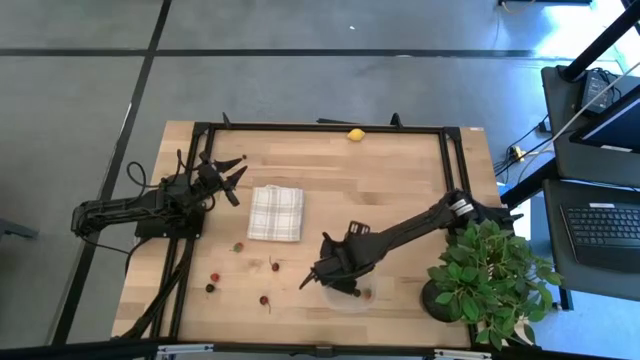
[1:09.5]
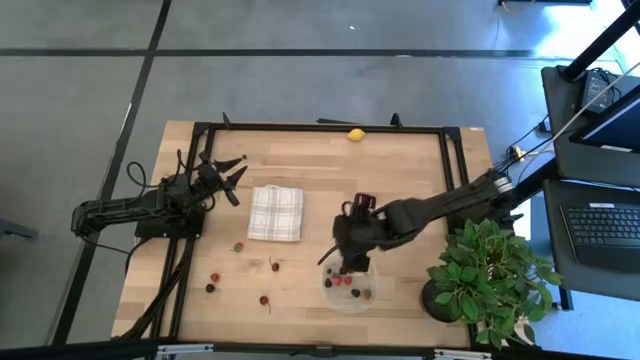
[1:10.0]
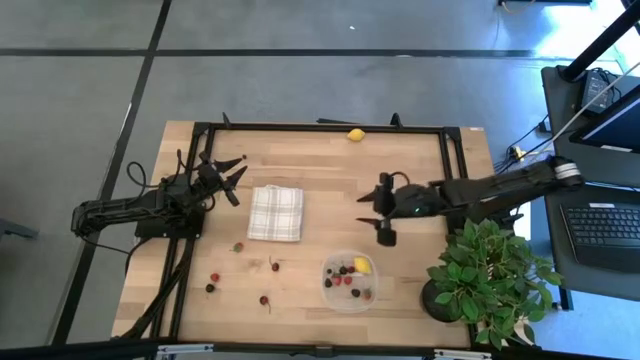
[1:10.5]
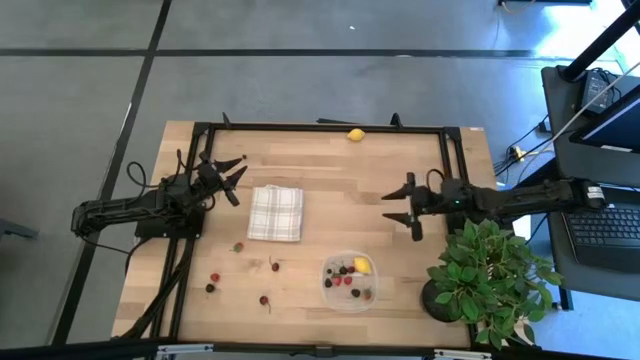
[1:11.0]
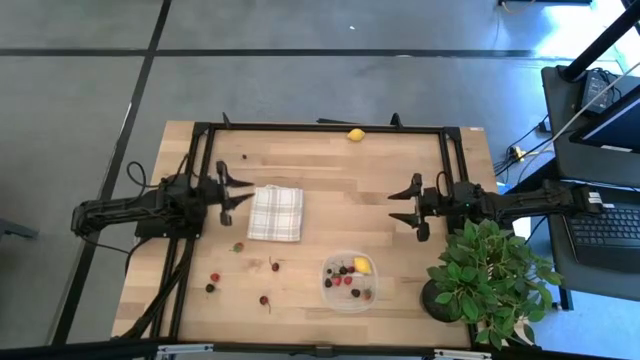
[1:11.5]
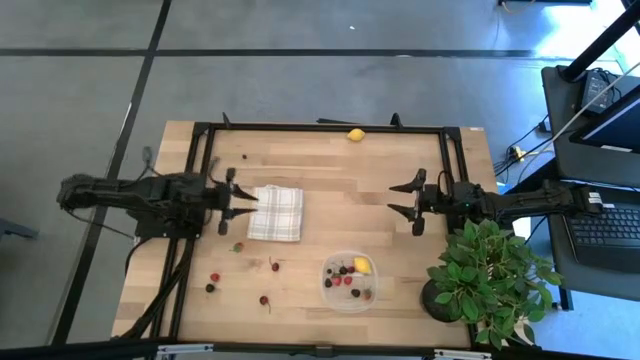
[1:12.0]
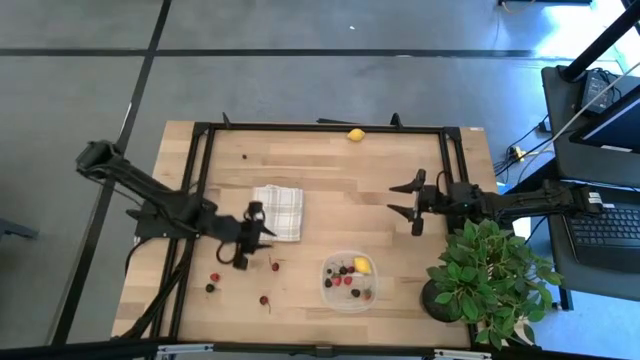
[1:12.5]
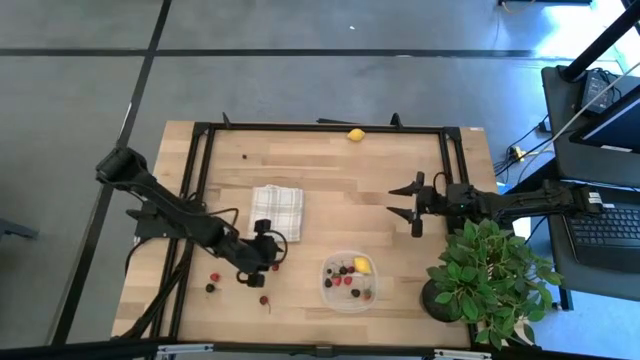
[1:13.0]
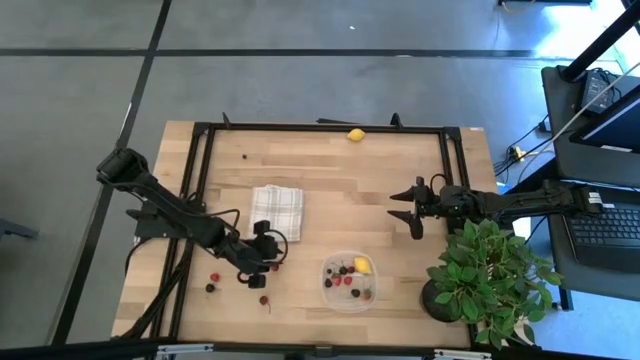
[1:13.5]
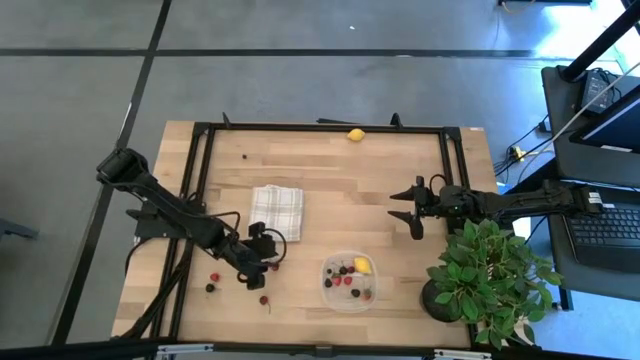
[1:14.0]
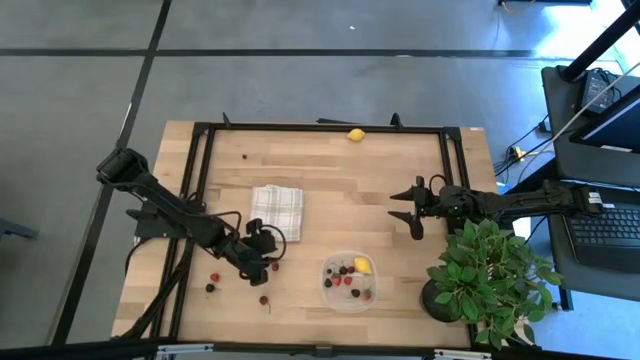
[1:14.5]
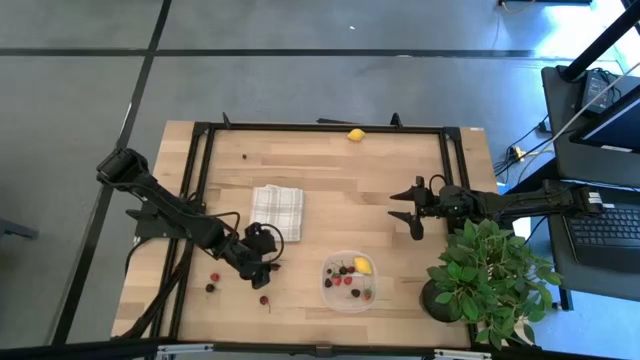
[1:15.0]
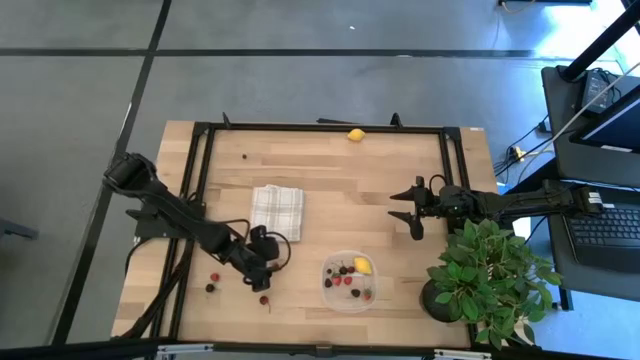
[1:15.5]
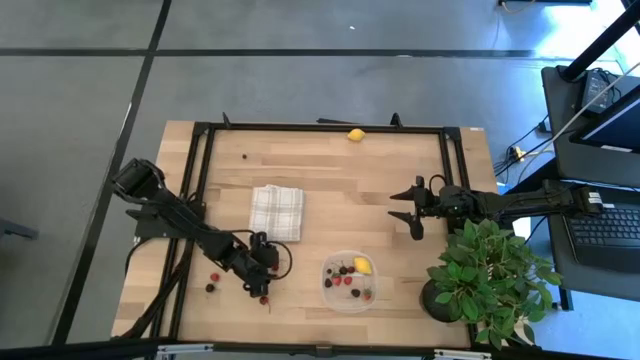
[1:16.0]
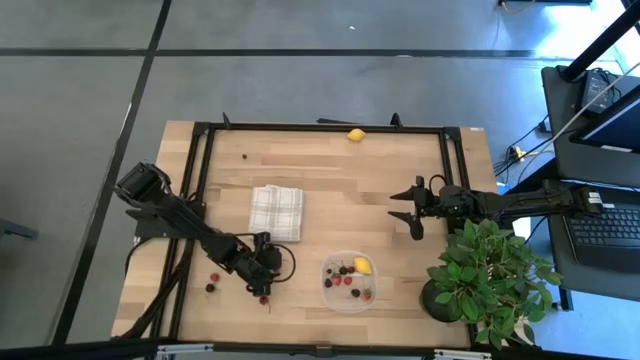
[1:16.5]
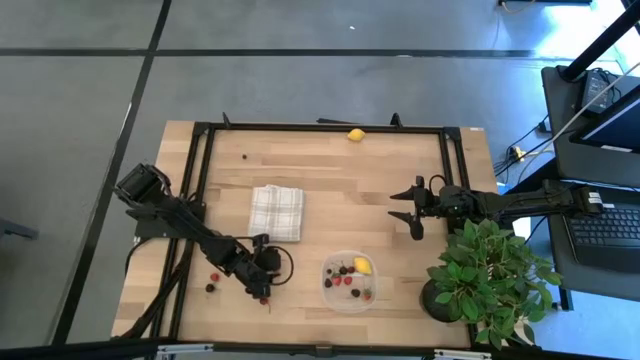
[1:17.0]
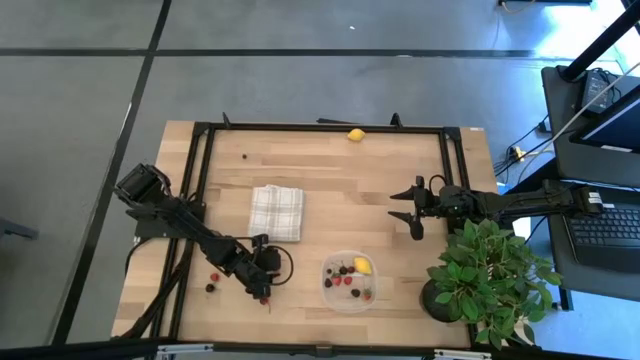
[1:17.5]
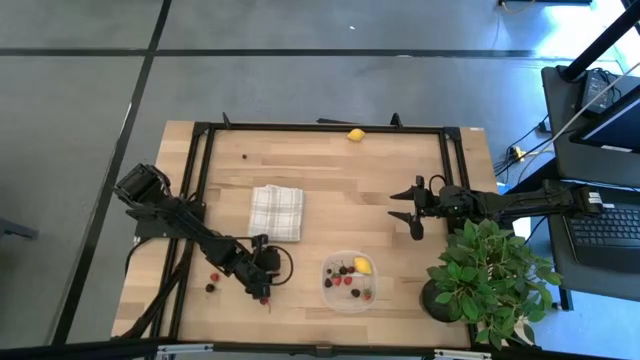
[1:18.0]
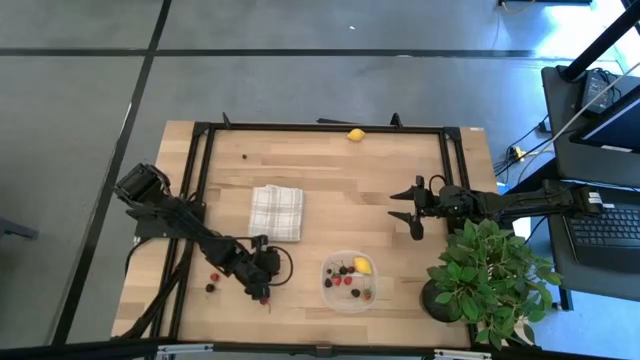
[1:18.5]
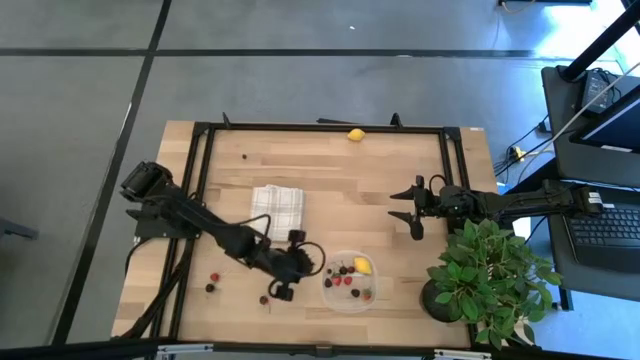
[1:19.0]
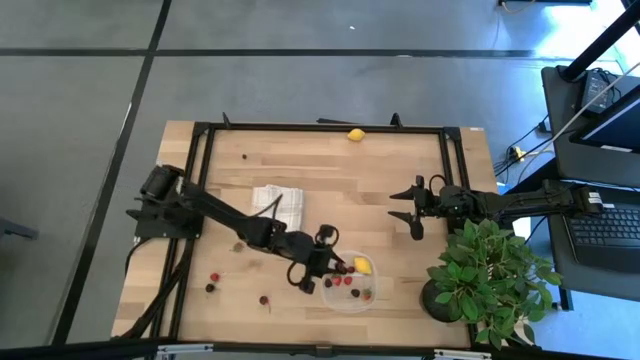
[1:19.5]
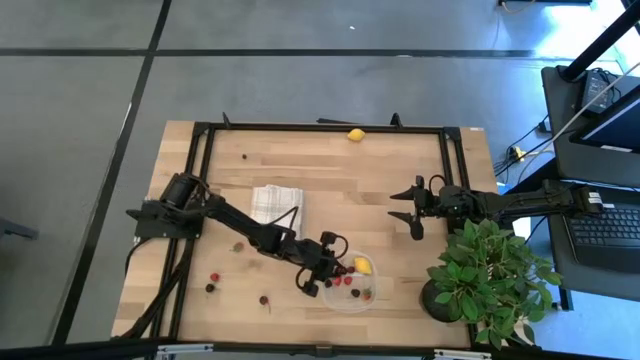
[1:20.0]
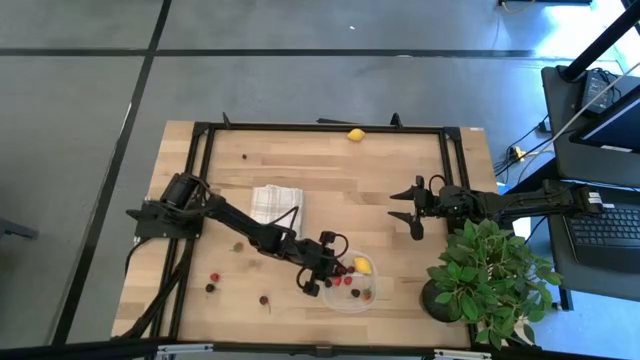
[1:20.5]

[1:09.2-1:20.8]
Task: Pick and placing Produce into tupperware
Put the top red cherry into the transparent container

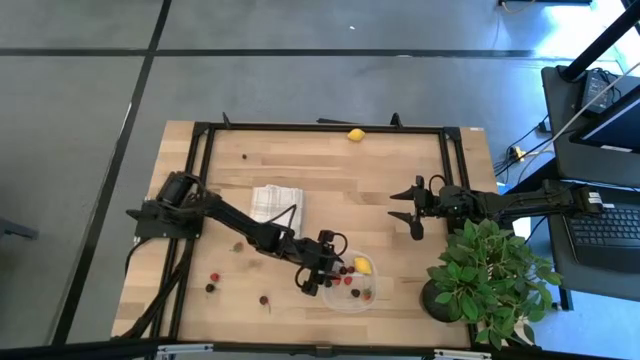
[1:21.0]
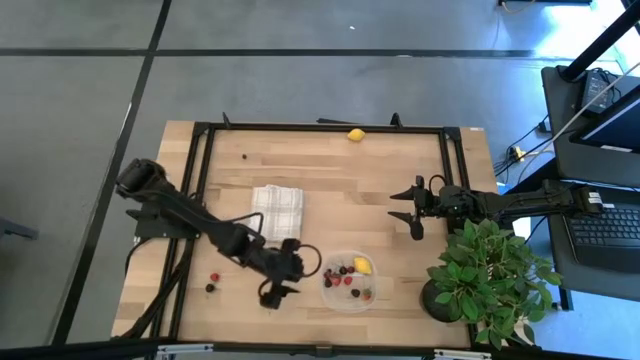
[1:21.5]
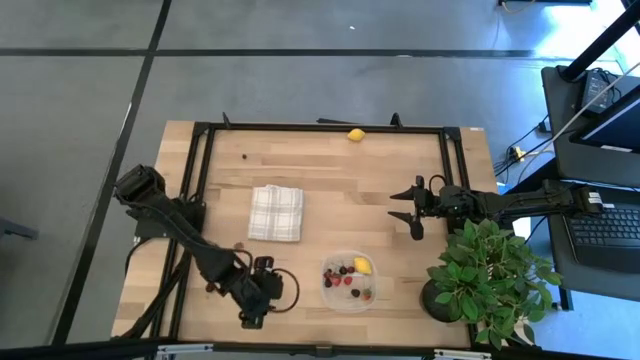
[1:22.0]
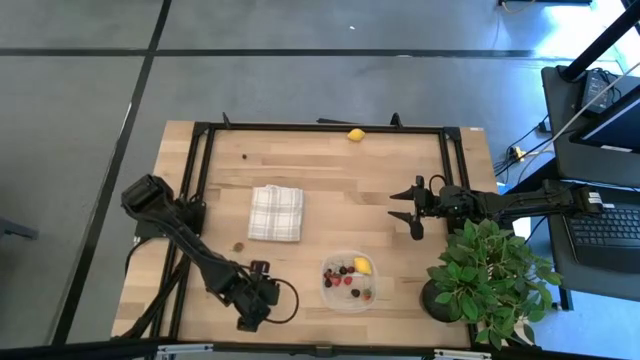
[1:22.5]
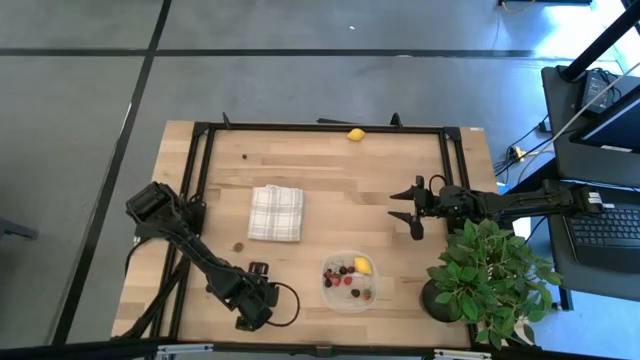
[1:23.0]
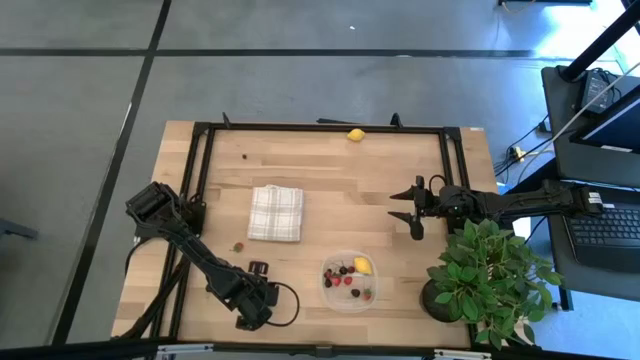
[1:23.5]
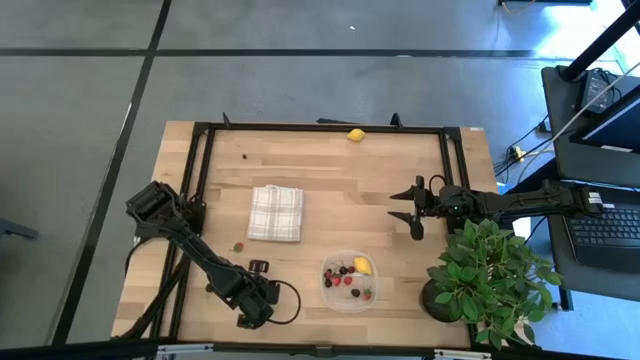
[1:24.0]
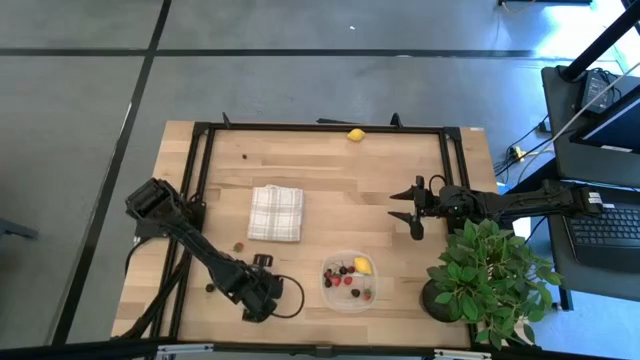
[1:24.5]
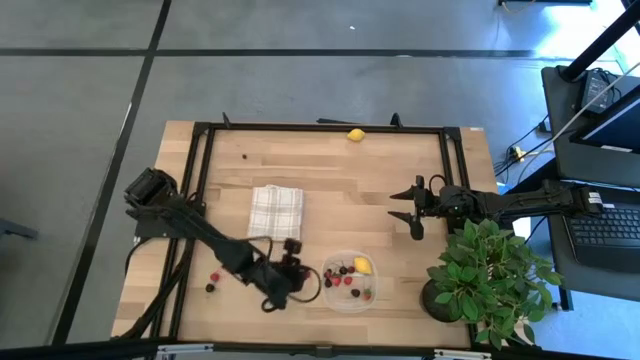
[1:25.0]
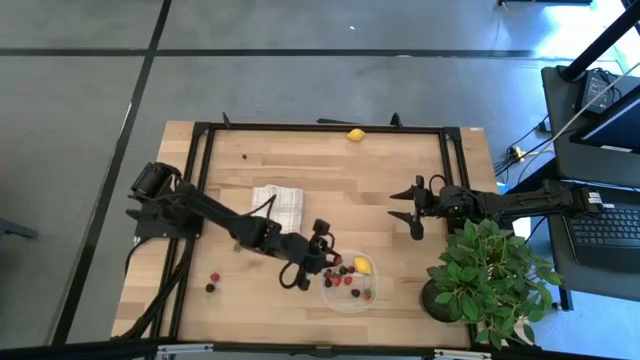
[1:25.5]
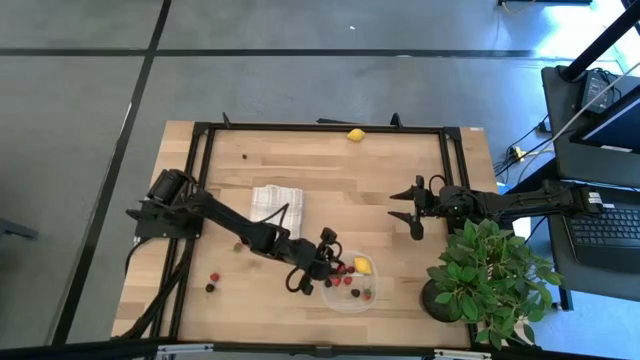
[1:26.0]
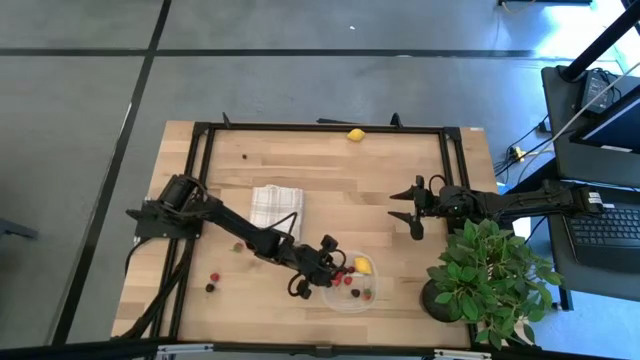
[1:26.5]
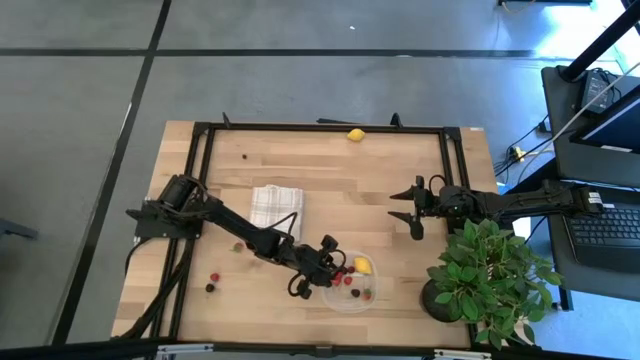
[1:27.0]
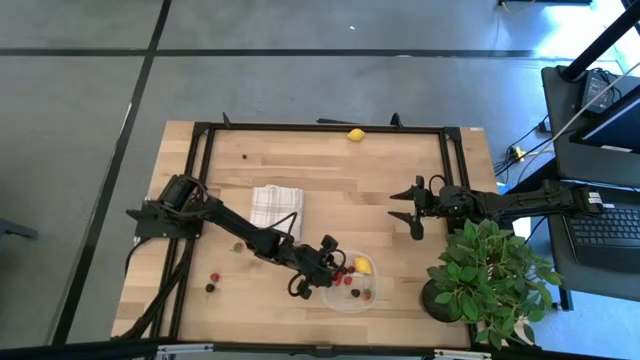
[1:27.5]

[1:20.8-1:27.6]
Put the red cherry into the transparent container

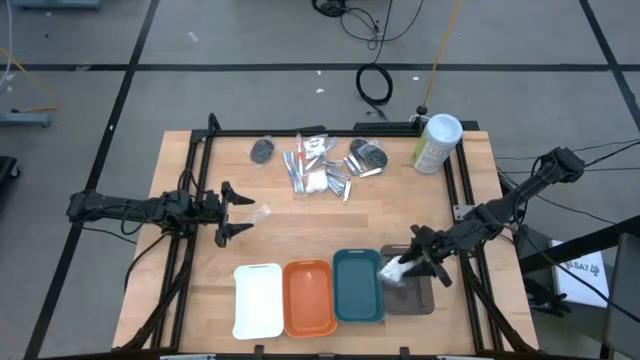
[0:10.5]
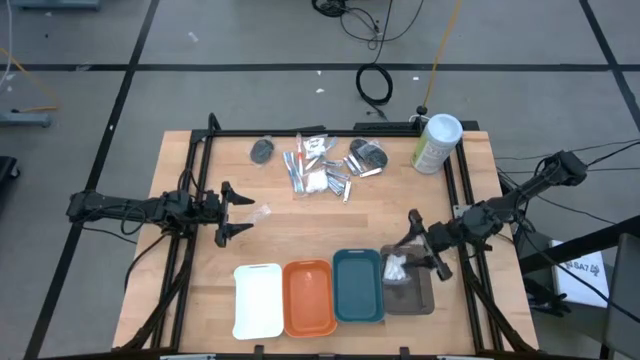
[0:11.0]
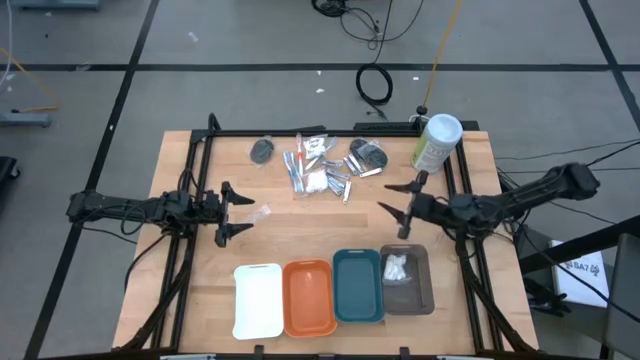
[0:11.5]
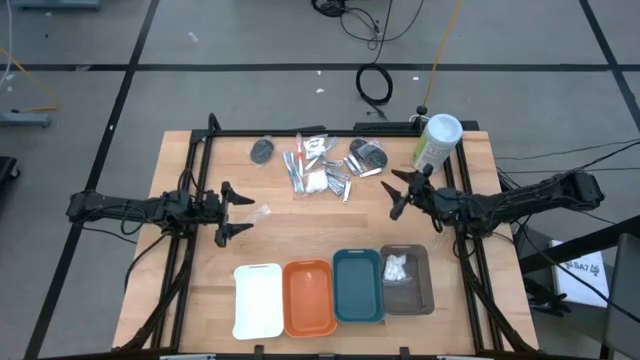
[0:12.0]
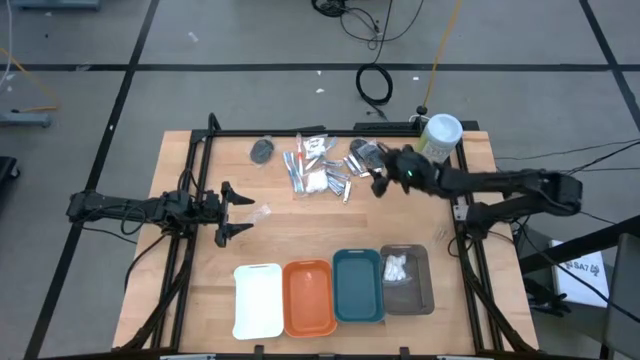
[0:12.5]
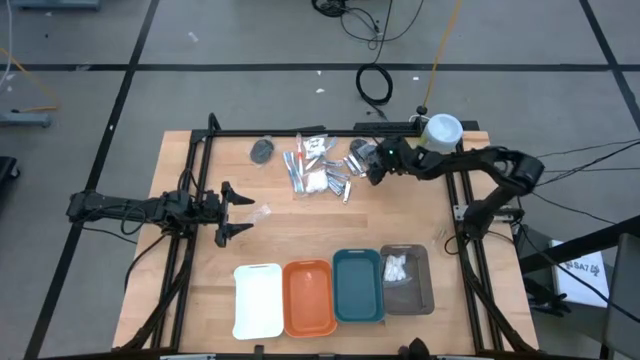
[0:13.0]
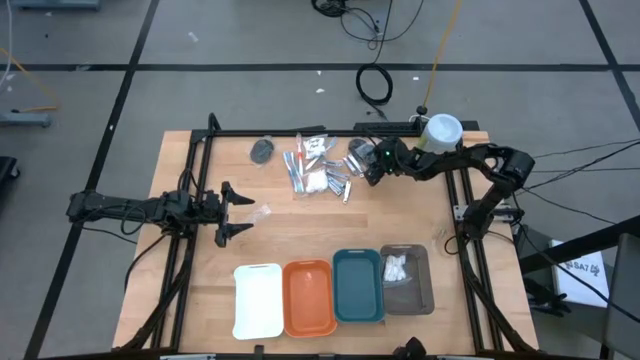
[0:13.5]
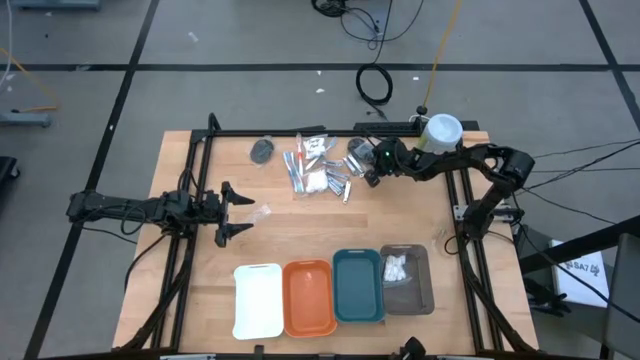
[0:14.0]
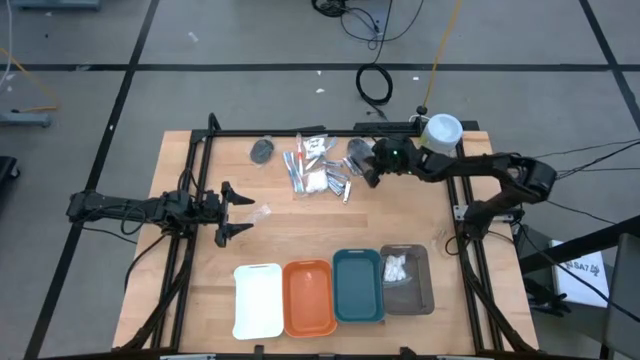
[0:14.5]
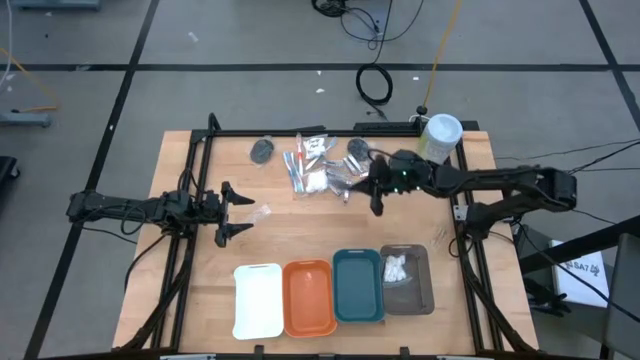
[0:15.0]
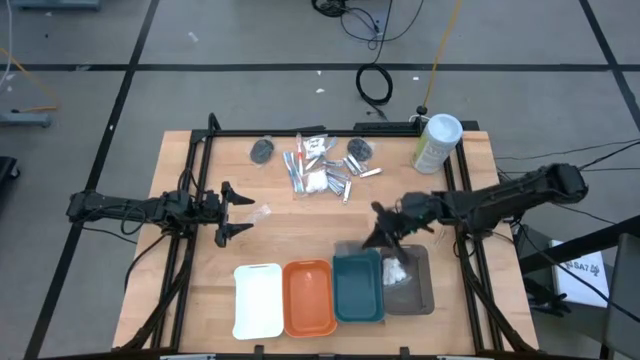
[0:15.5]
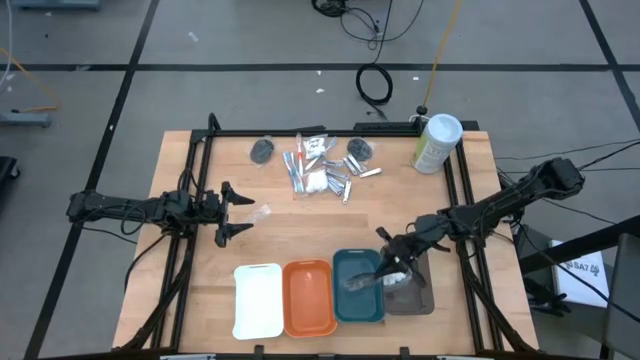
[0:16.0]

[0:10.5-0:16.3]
Task: Pick & Place Travel size toiletries
Put the black hairbrush into the blue bin
